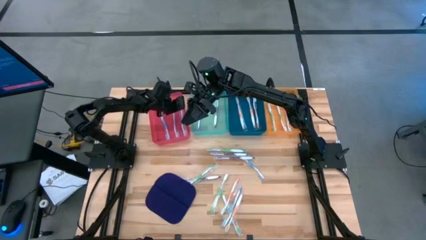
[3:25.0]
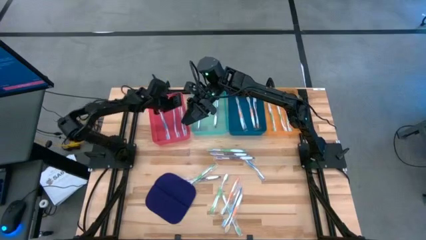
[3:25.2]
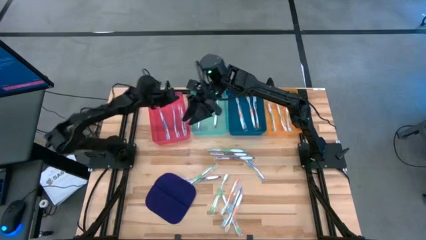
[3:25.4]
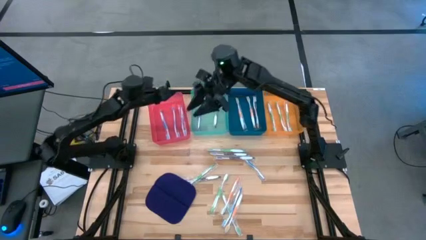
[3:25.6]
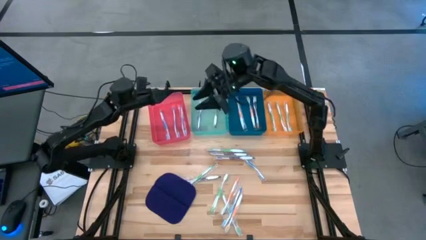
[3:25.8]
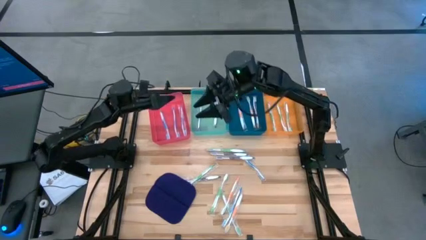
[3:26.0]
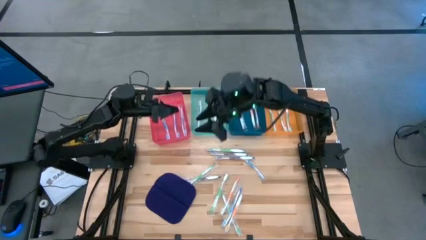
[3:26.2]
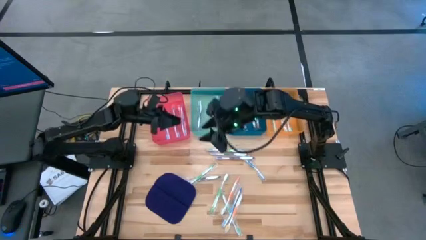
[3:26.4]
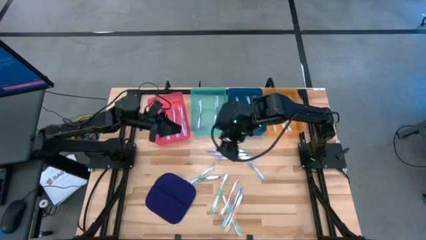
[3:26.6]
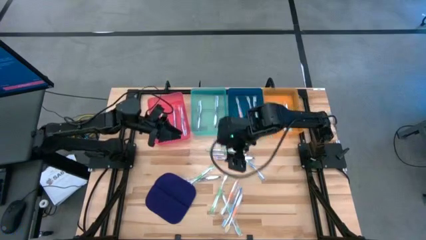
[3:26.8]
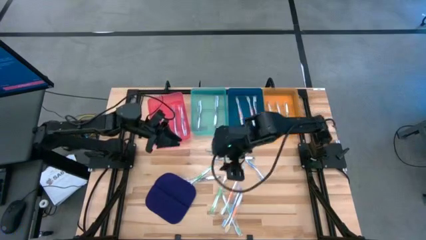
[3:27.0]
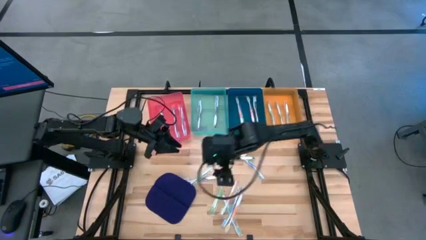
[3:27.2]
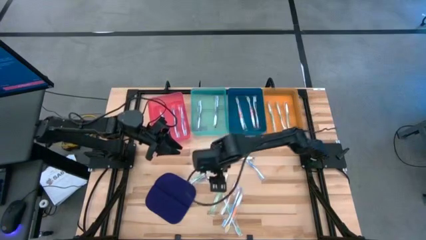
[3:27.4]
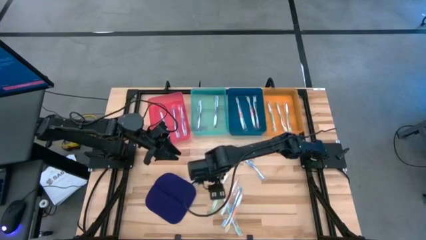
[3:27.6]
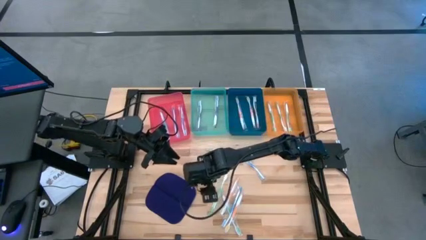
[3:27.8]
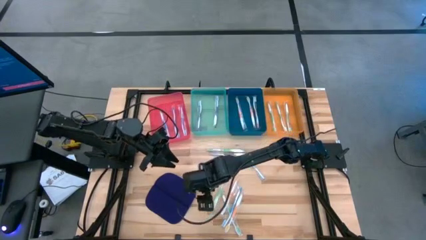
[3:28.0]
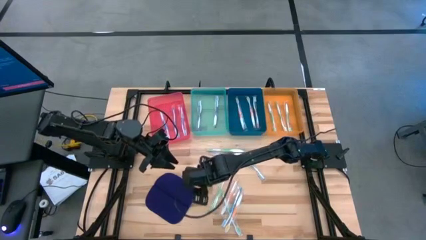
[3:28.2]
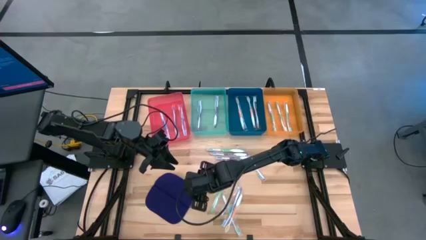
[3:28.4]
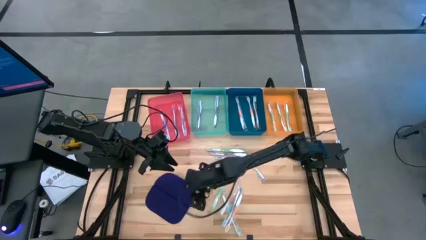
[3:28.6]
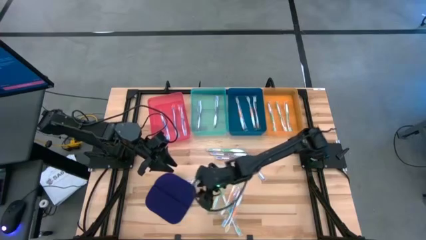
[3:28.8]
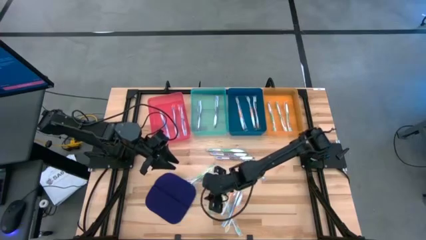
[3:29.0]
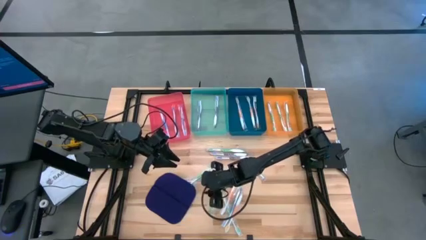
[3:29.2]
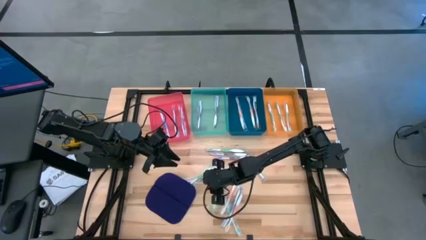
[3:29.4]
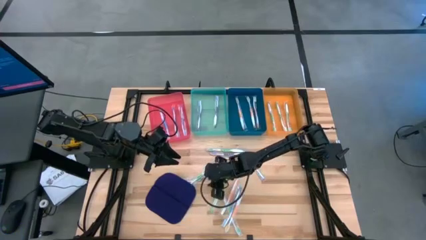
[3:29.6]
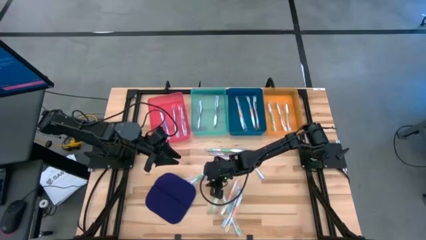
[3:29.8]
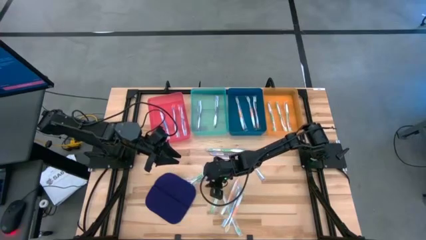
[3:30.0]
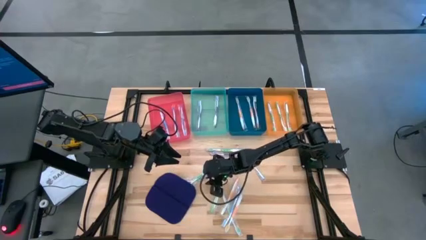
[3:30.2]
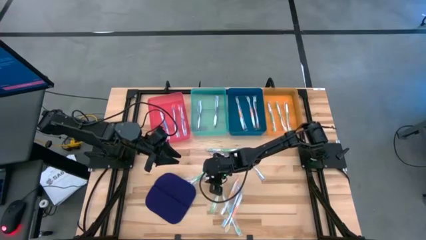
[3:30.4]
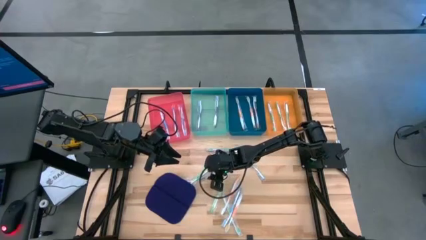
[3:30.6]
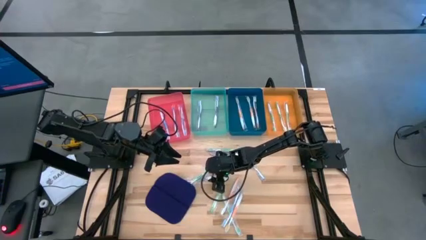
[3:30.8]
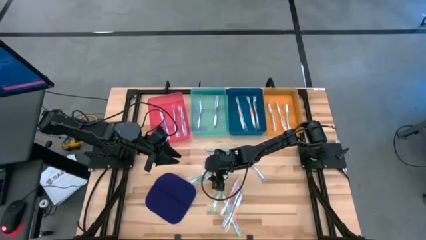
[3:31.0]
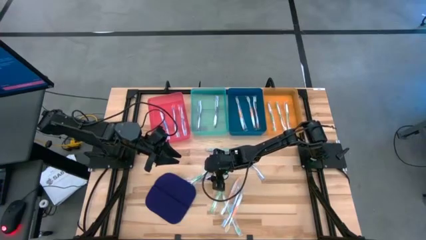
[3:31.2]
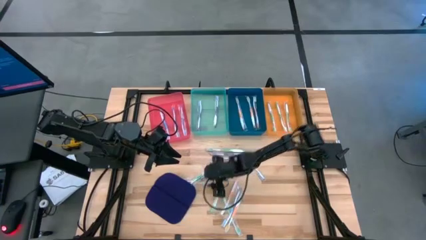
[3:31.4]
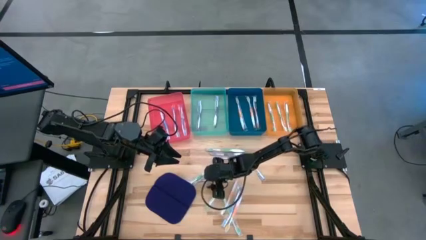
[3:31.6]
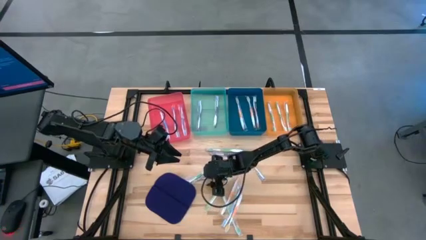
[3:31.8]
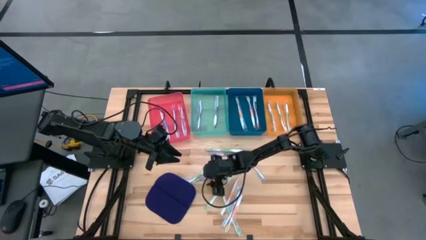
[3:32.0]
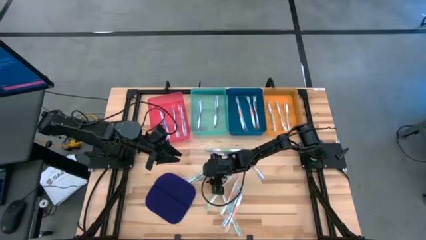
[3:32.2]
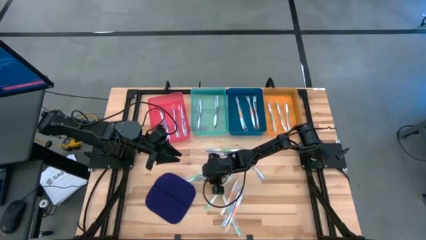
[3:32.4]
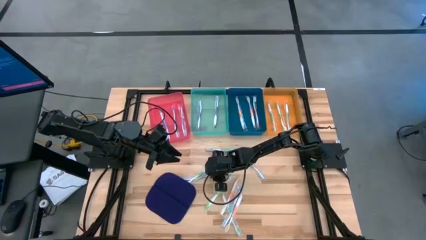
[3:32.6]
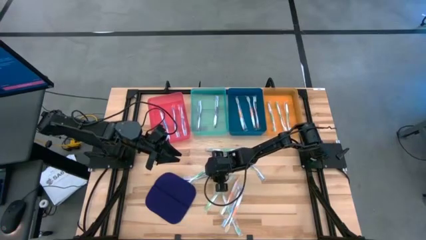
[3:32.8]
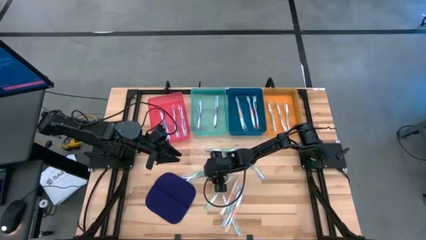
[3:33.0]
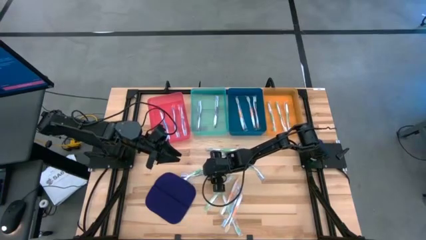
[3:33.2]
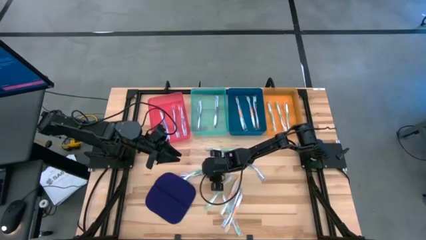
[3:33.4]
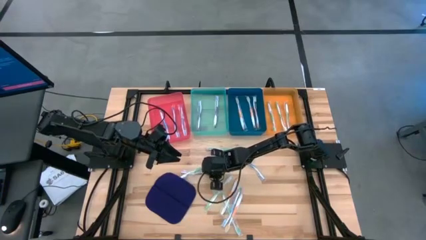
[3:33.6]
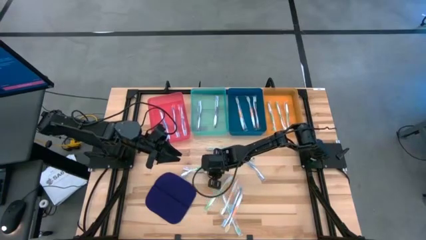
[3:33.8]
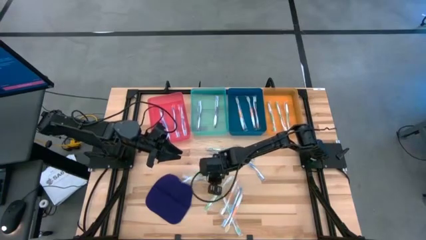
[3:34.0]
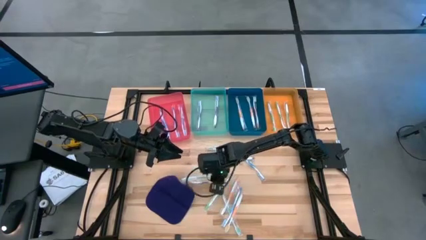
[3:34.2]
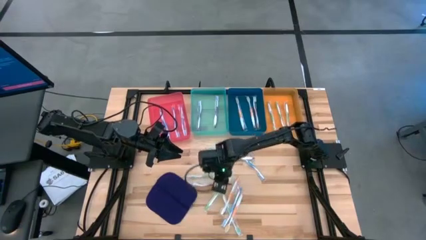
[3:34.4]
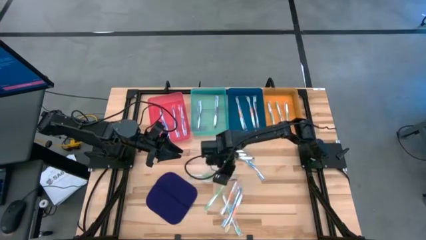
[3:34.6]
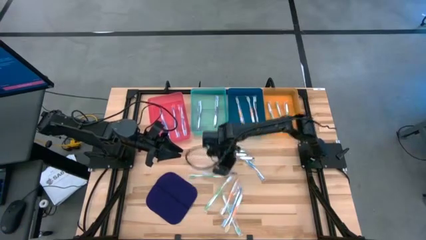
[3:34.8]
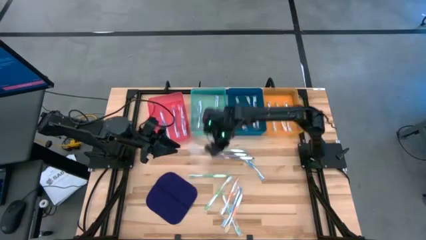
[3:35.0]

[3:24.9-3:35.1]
Task: Pick & Place Toothbrushes
Put the purple toothbrush into the green bin

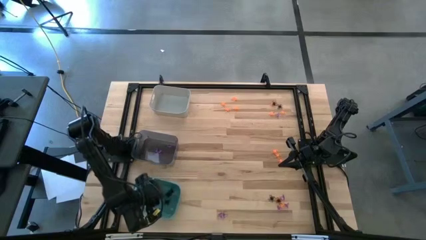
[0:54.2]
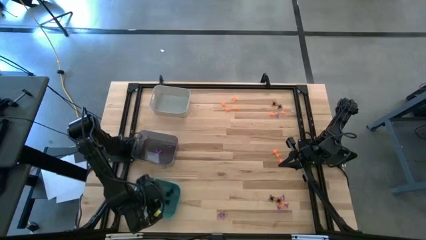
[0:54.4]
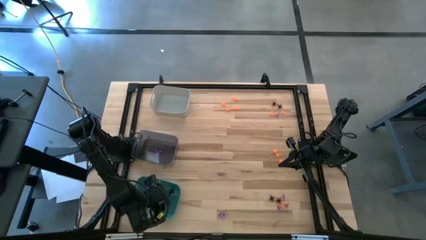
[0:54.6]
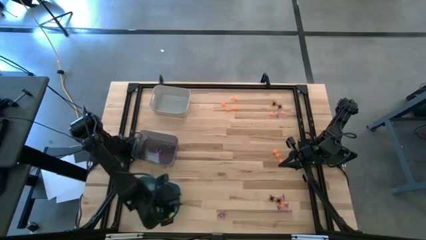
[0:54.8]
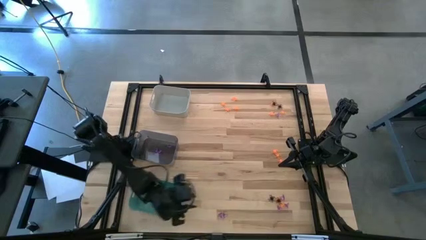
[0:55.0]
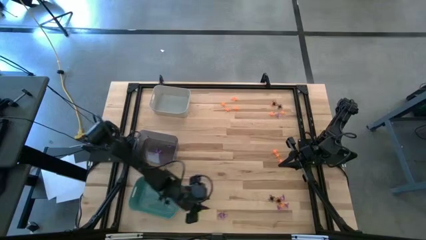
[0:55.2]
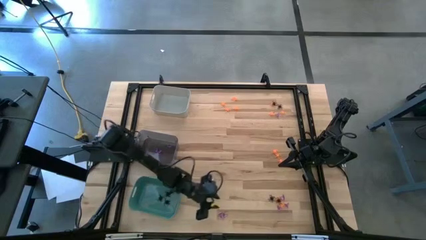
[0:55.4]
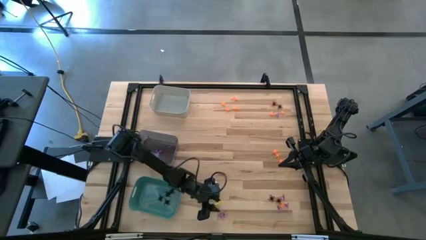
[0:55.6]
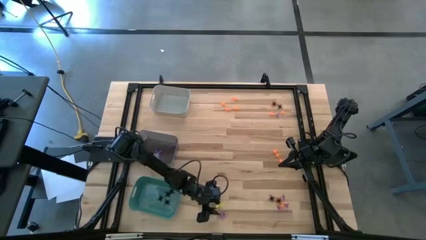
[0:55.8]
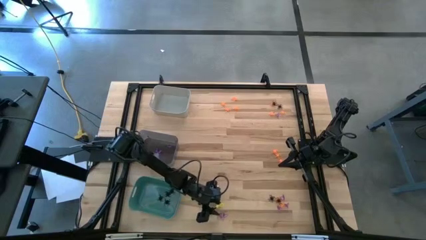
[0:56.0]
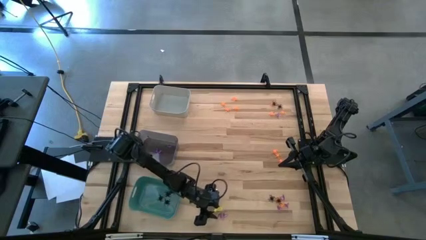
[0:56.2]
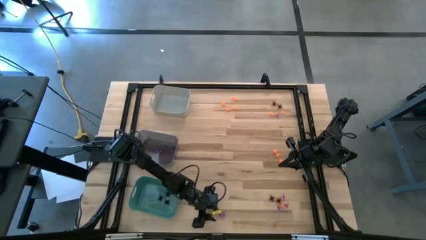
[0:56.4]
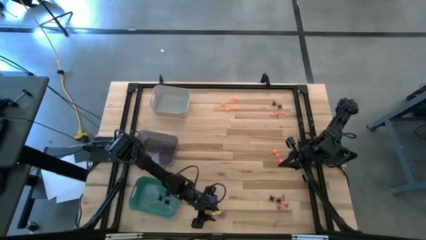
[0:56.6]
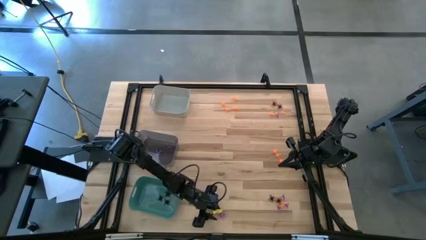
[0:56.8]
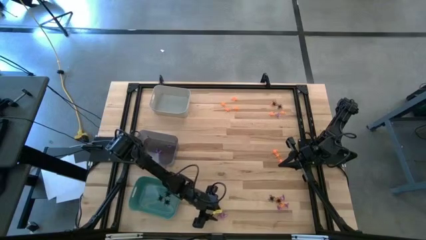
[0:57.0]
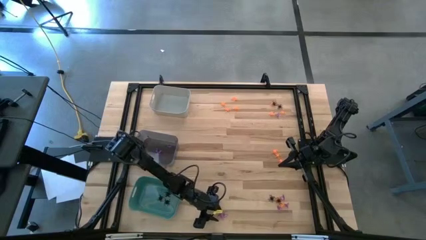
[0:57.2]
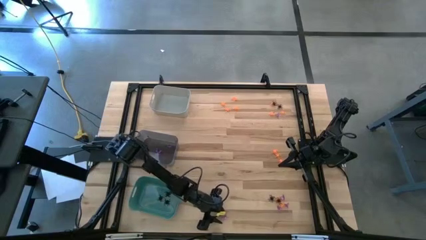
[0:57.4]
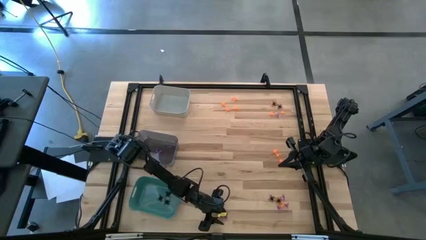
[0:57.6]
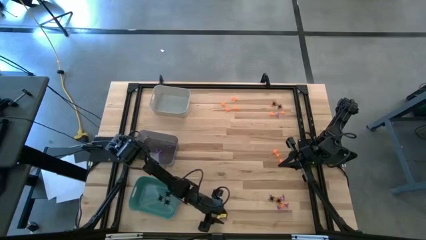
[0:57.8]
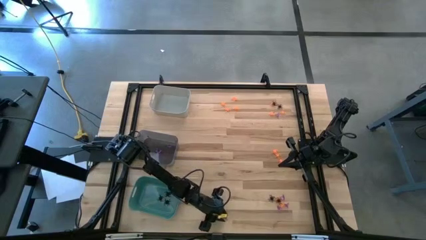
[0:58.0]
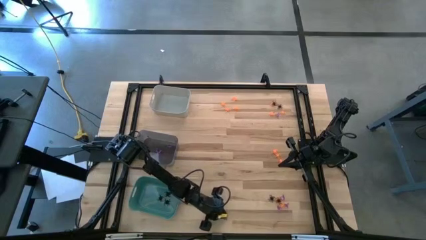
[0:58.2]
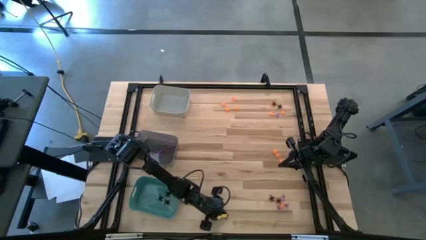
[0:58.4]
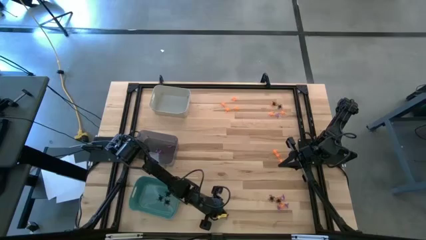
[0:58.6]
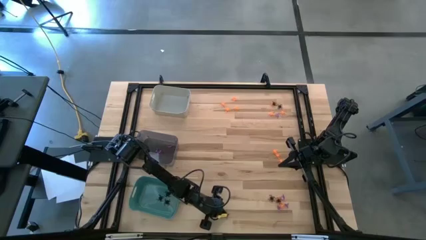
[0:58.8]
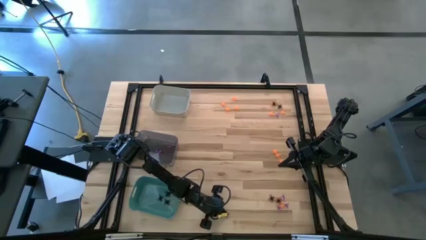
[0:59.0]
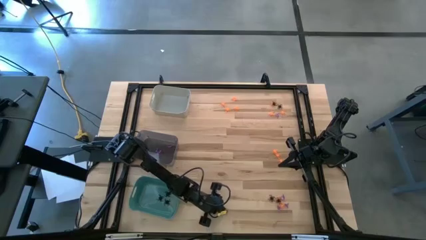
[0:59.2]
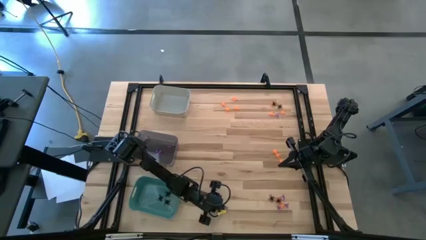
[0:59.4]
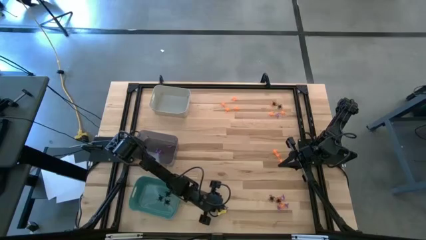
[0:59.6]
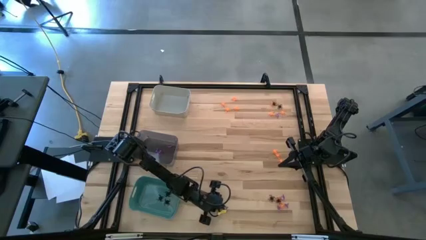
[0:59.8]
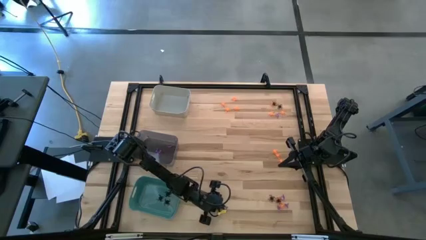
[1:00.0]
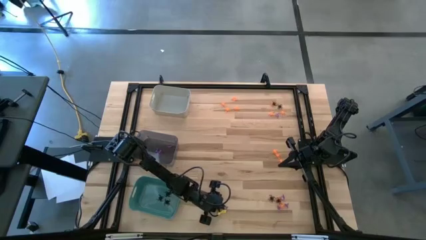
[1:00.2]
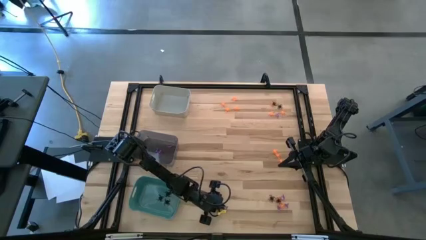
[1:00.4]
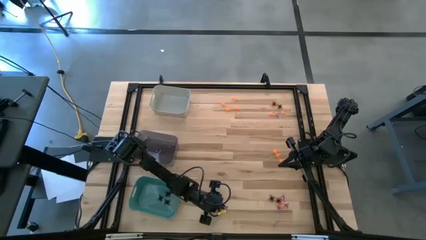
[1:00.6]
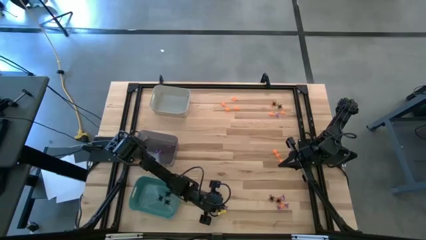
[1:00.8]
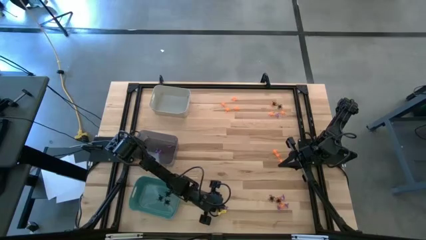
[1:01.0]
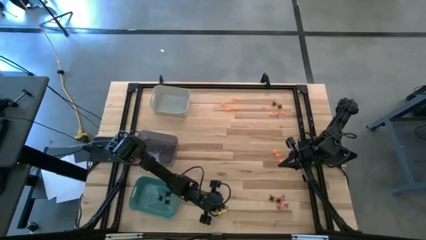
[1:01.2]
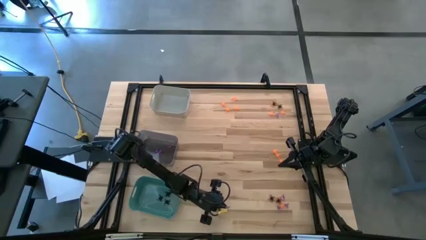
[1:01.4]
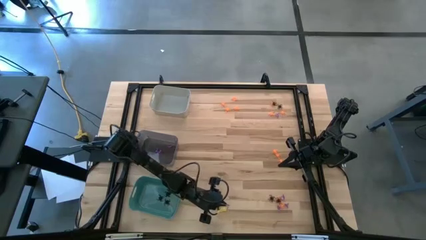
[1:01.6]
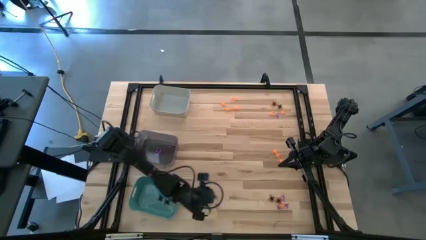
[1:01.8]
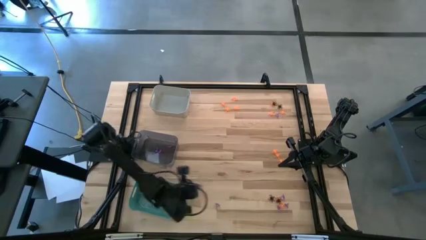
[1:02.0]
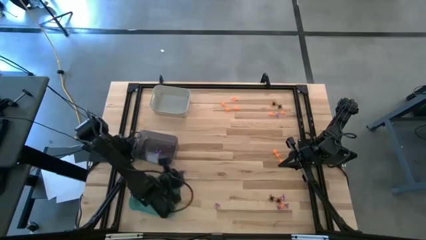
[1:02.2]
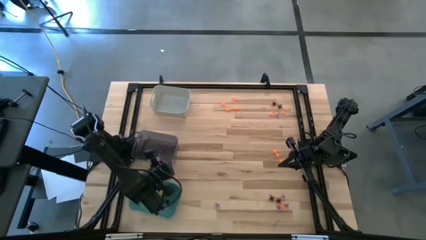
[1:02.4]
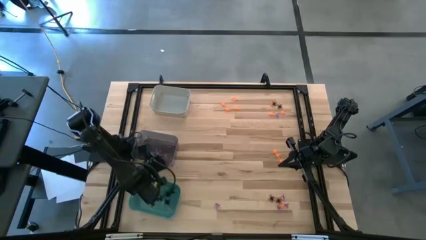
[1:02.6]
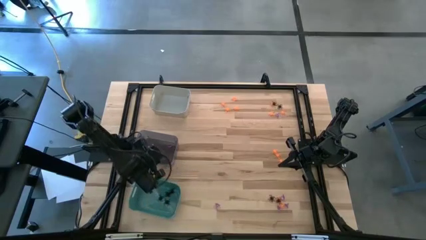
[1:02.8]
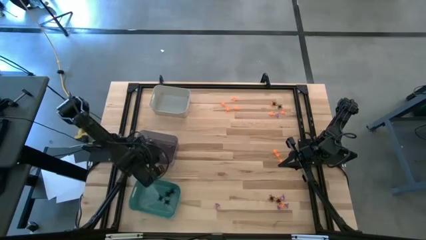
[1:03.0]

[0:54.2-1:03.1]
Task: Sort Halloween decoration
Put the bottom center violet witch hat into the black bin
